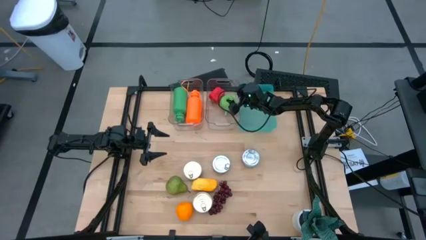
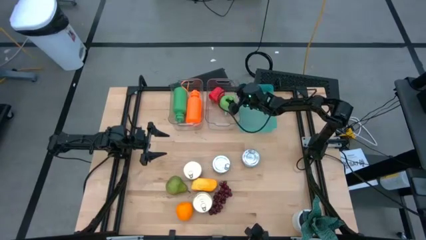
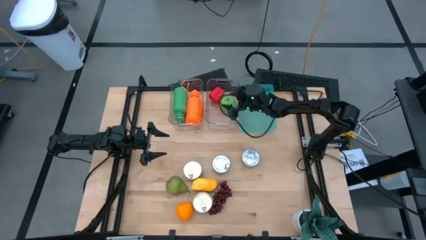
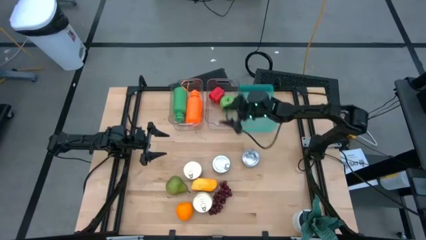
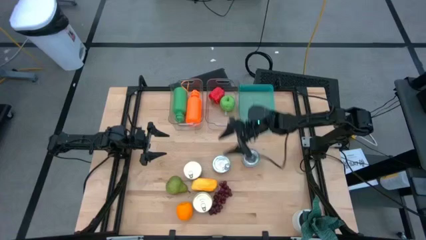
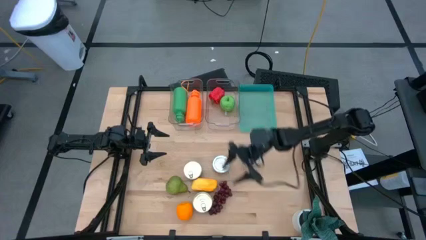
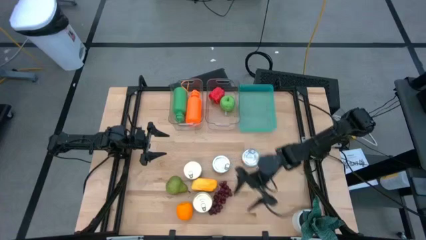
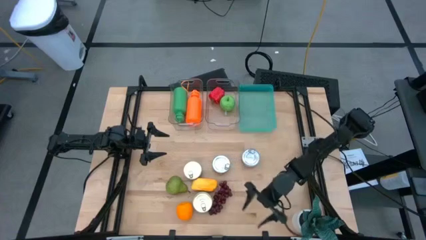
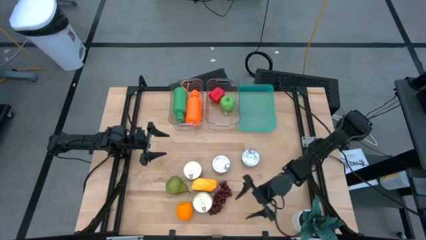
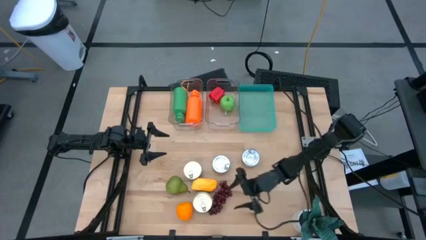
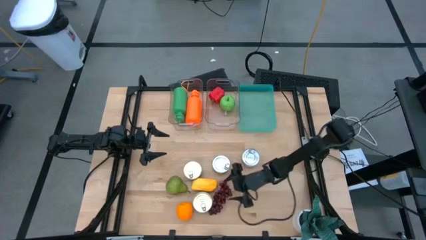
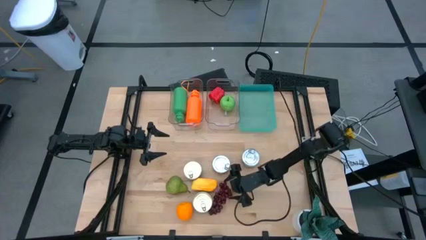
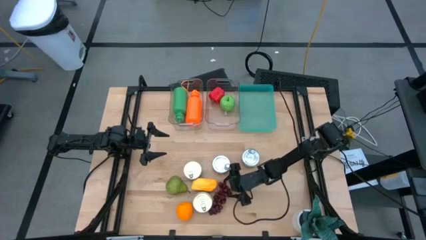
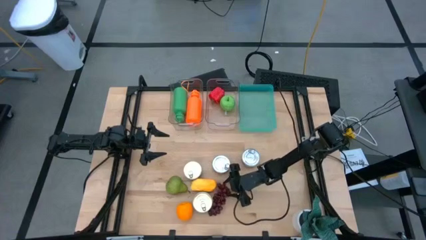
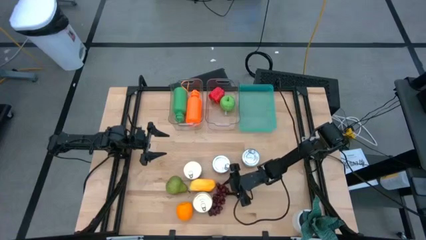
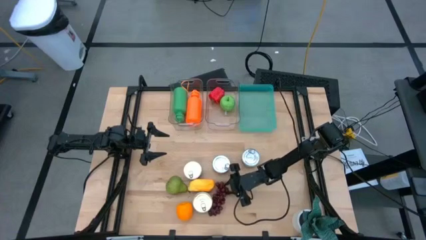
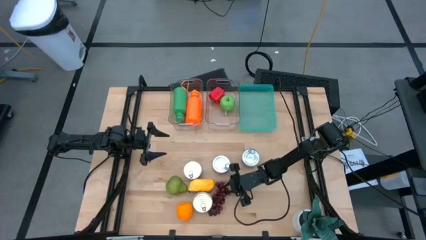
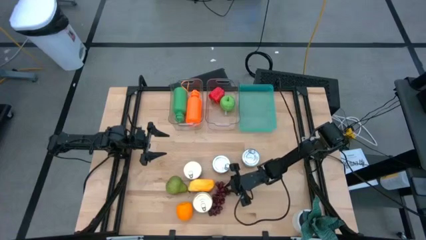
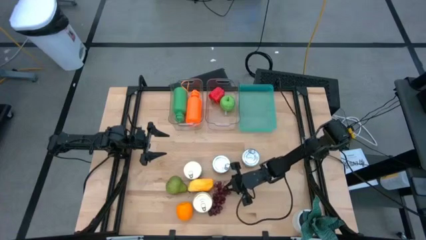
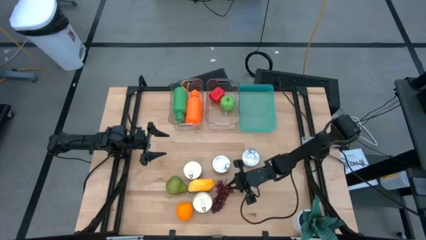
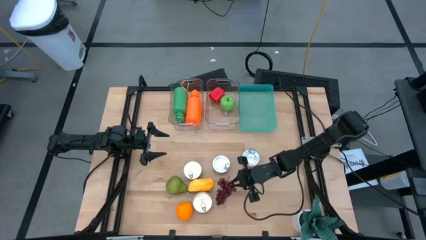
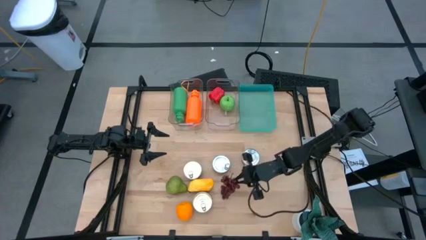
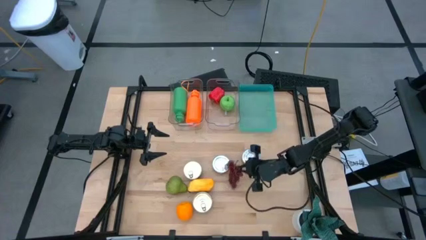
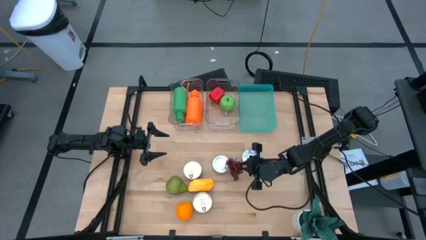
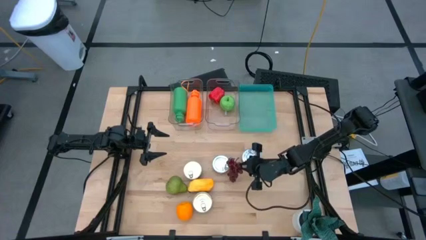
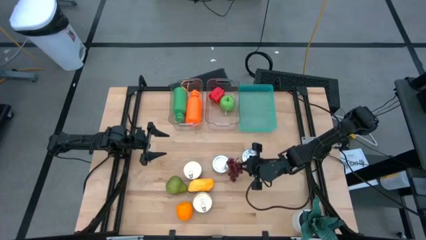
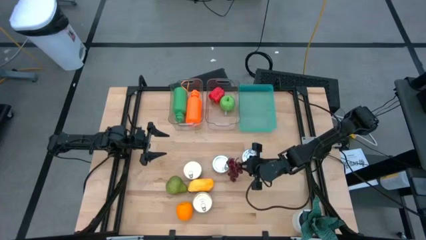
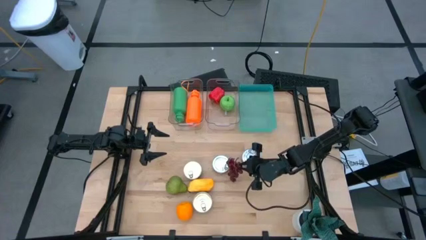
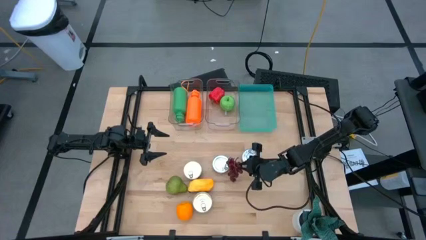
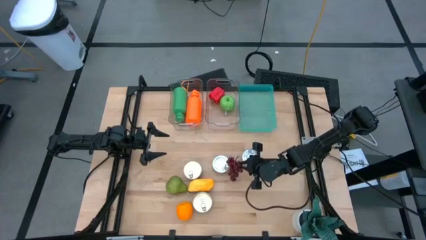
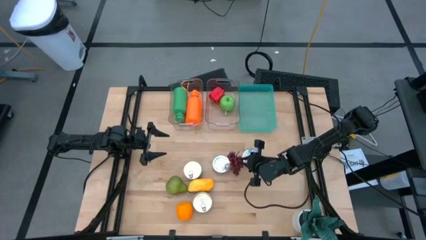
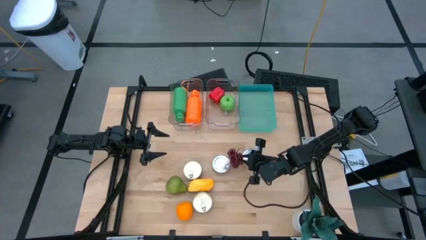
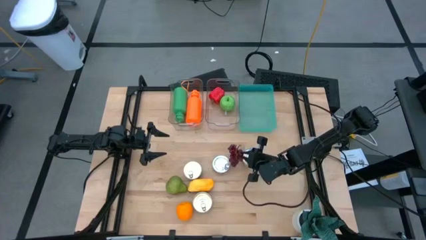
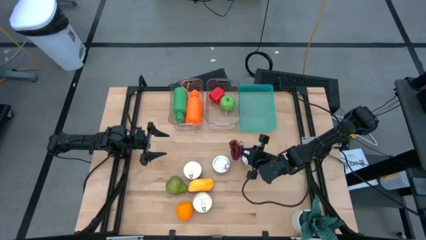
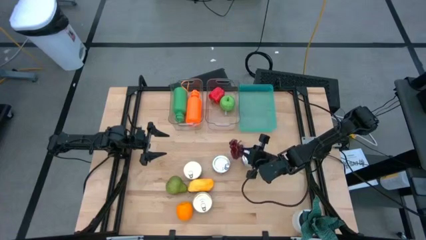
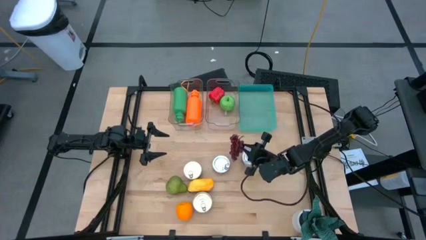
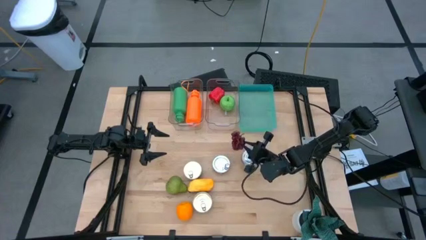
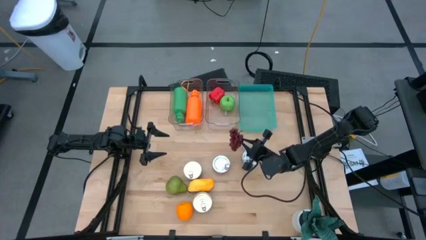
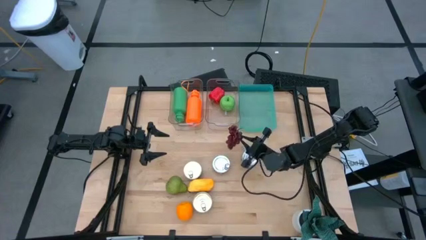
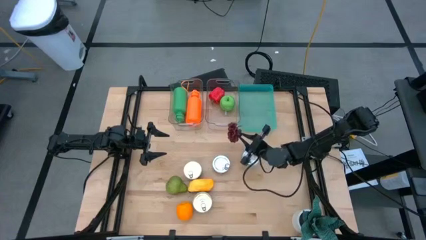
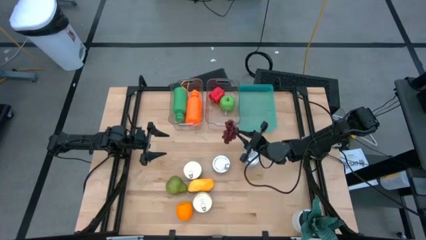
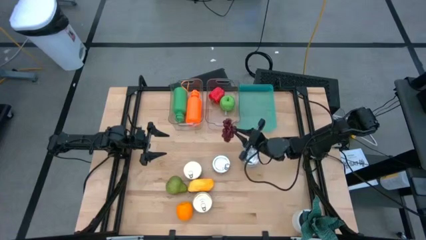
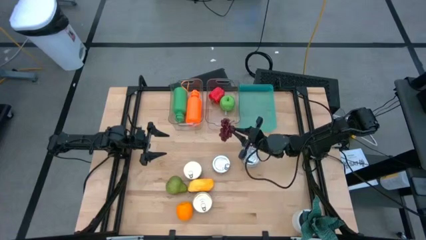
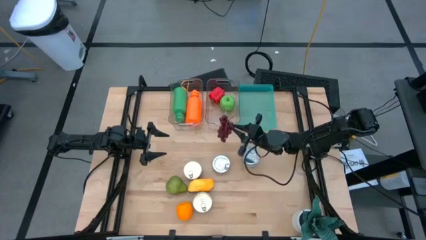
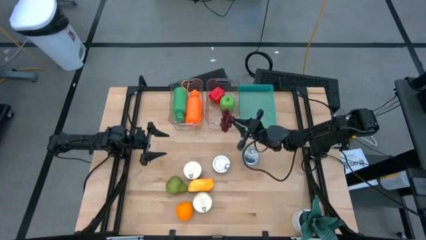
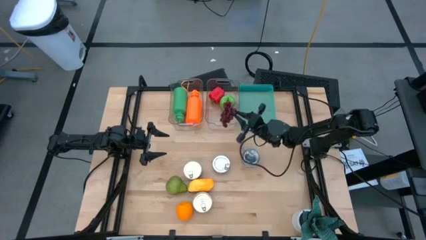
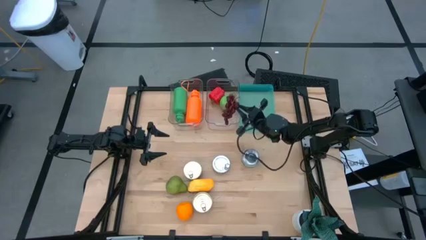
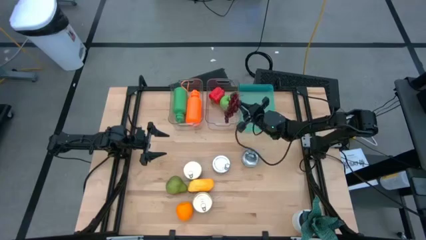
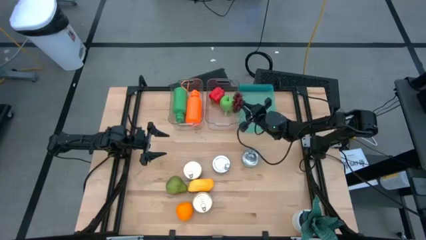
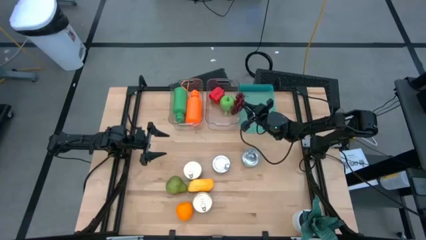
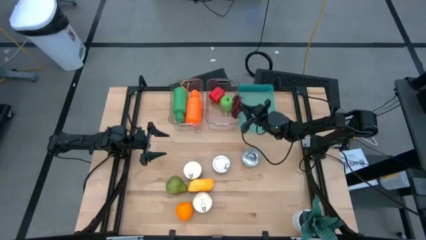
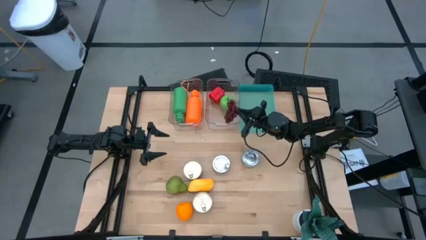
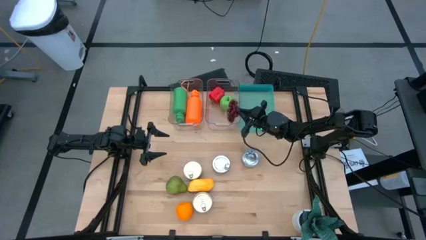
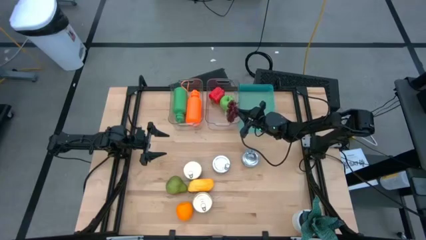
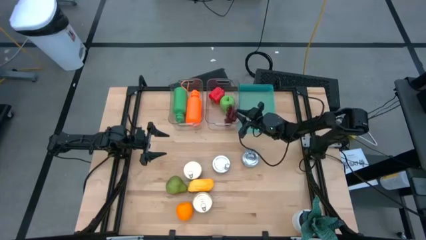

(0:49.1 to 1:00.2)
Task: Pick & Place Food Item
Put the grapes into the right transparent bin
